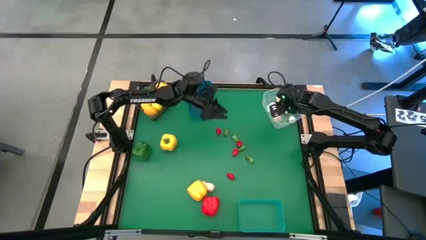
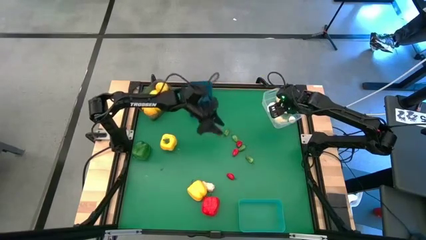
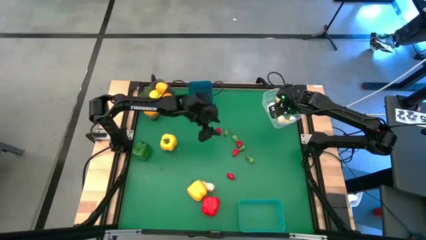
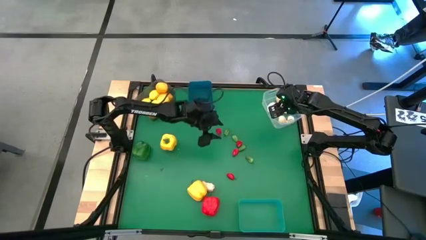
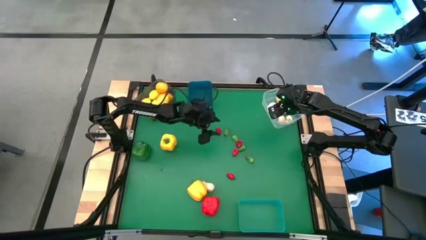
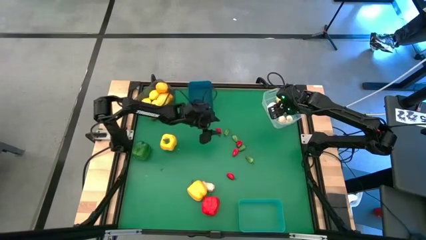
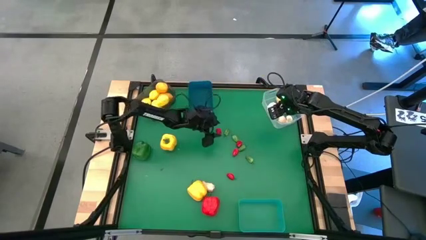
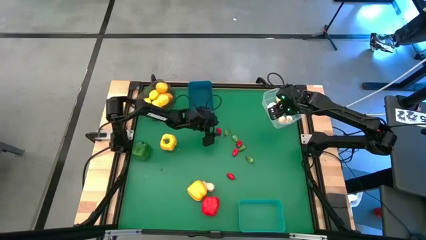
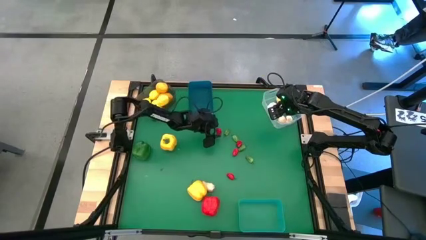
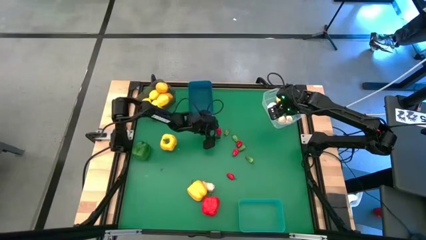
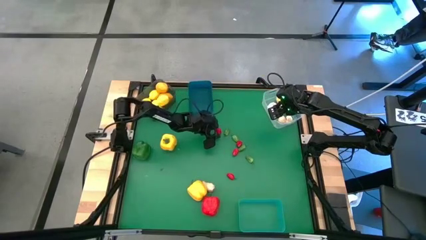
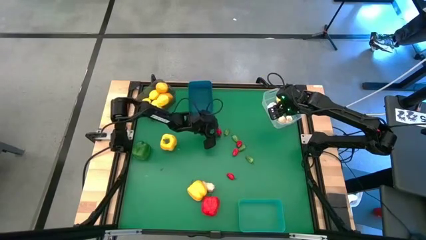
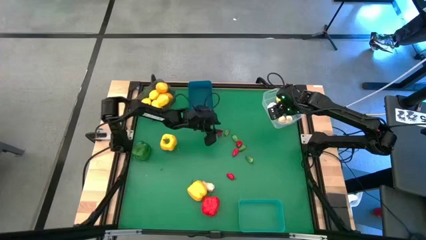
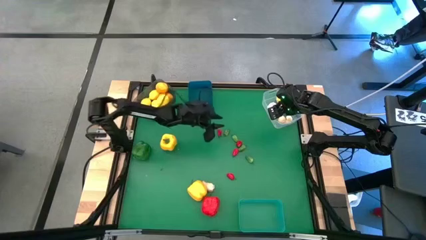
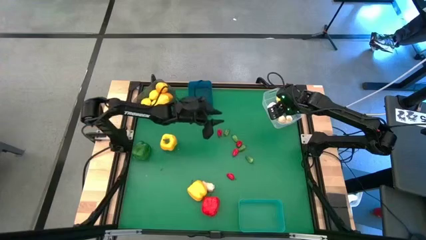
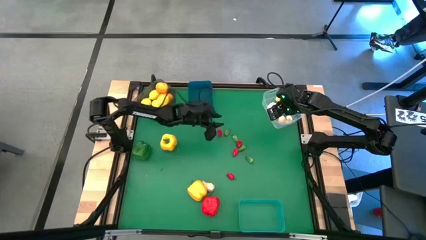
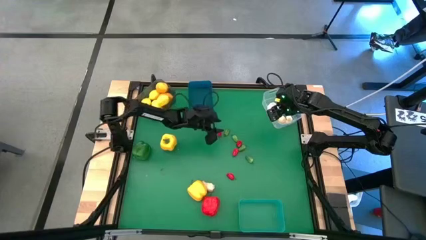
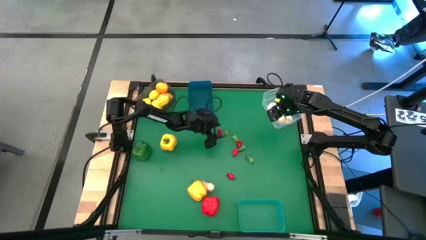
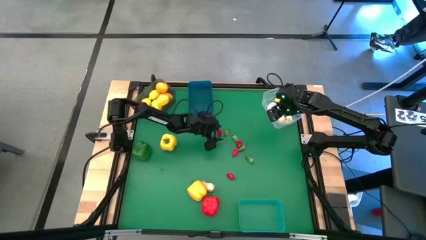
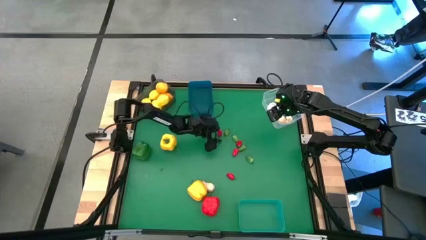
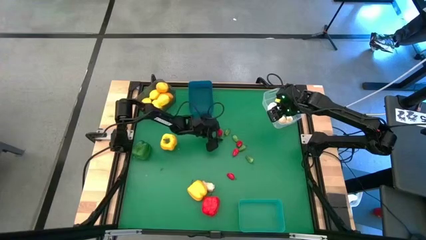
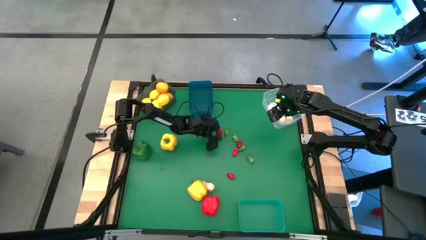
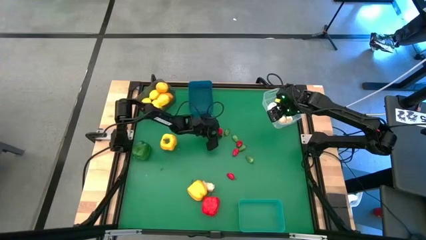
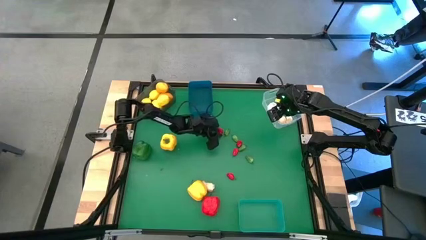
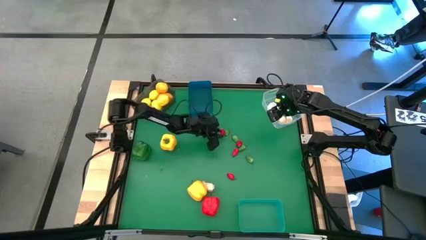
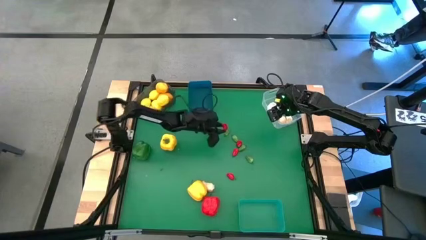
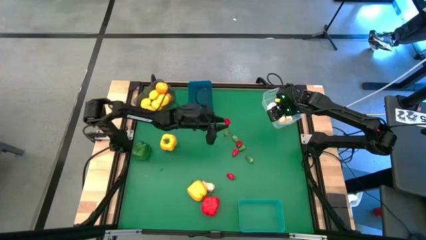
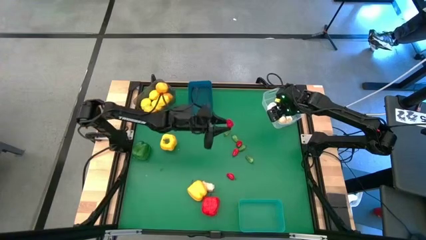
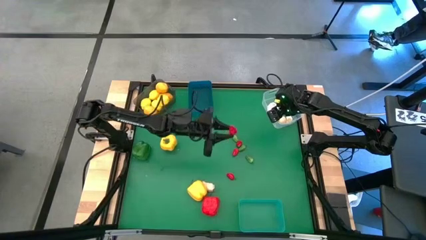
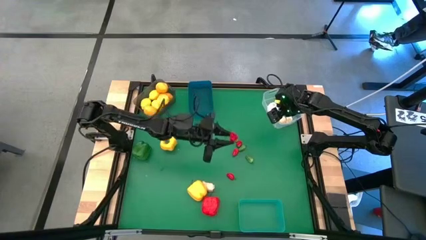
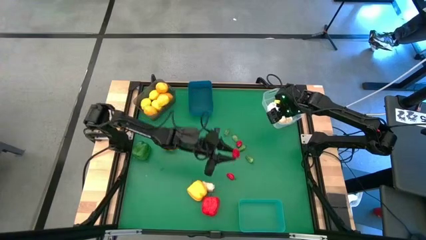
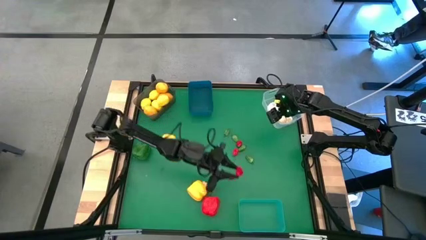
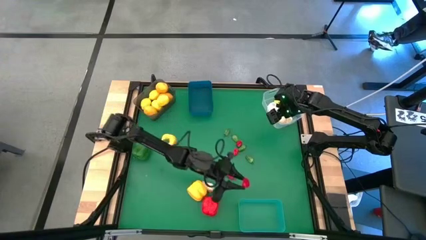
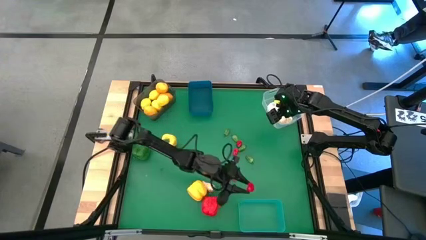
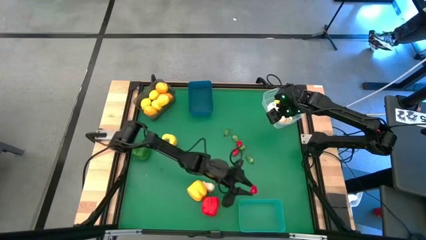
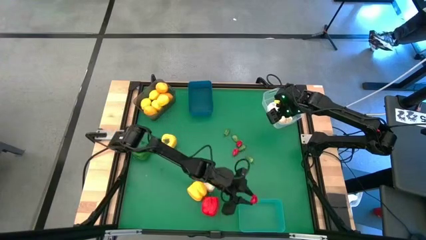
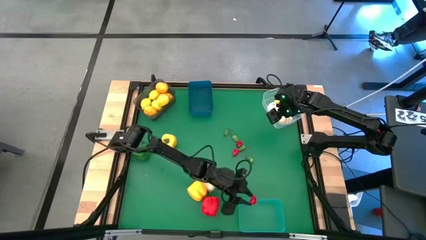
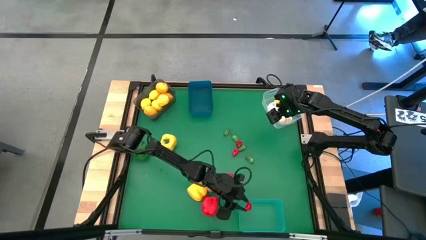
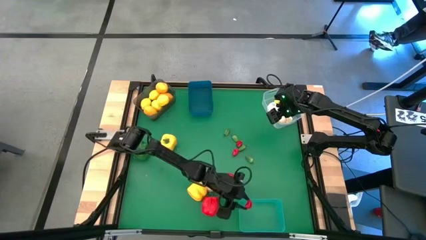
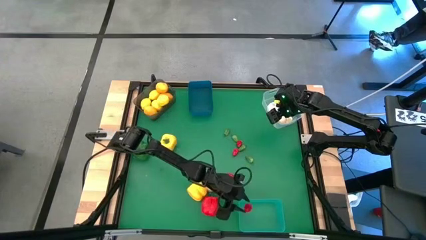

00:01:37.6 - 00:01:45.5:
Task: Sort produce into baskets
Put the top left red pepper into light blue bin

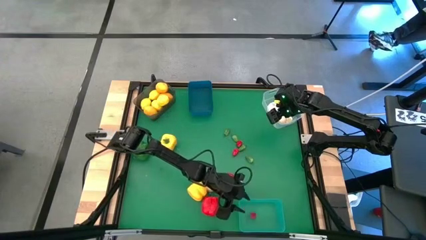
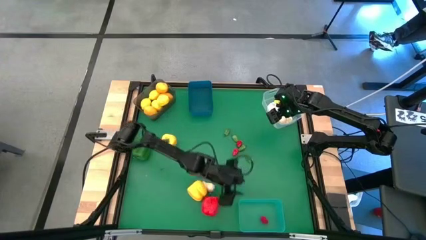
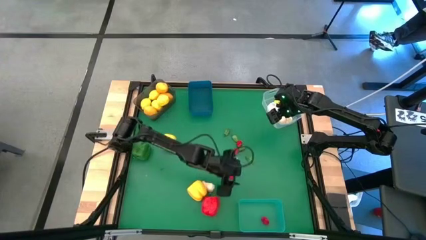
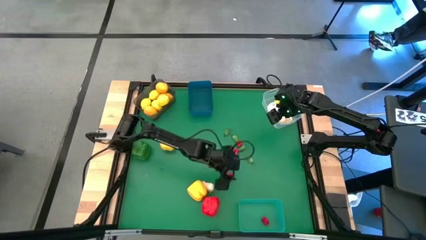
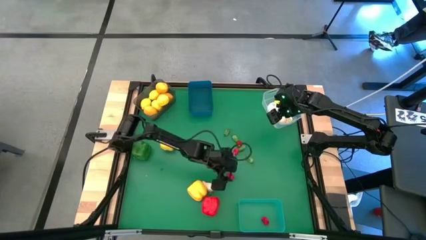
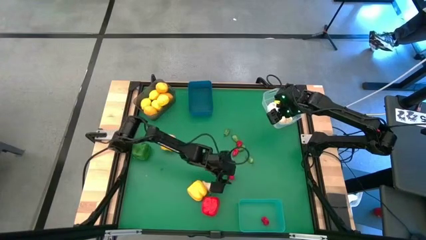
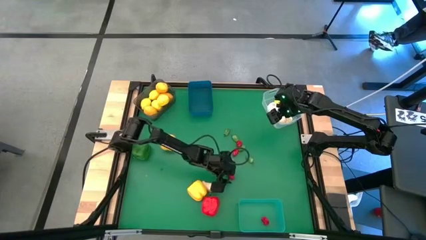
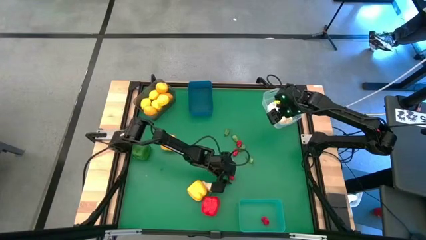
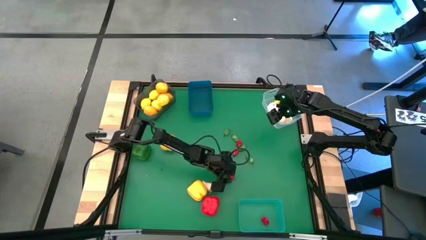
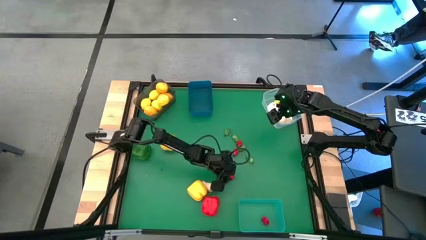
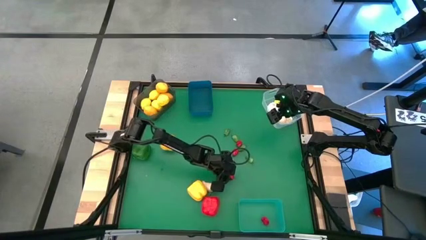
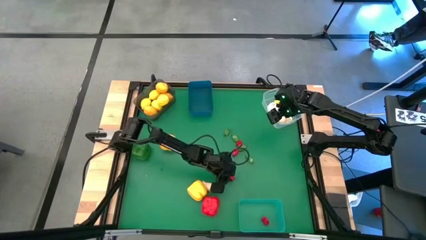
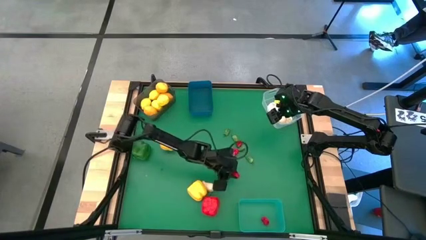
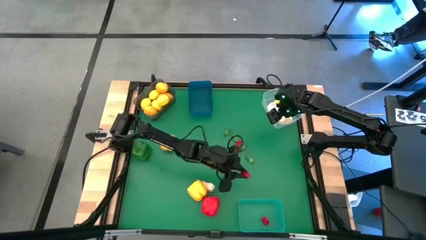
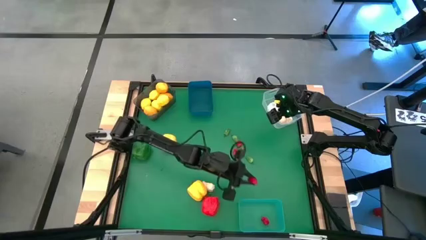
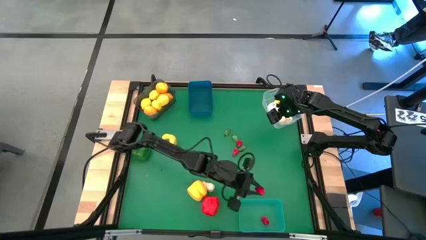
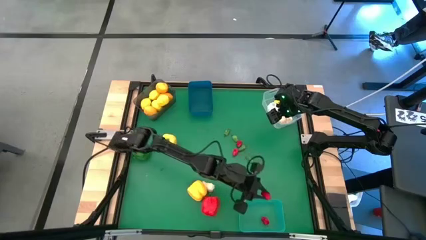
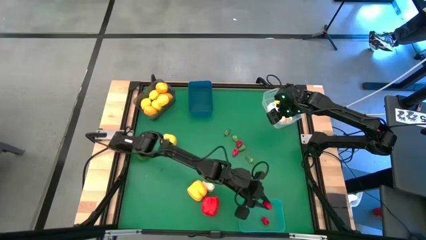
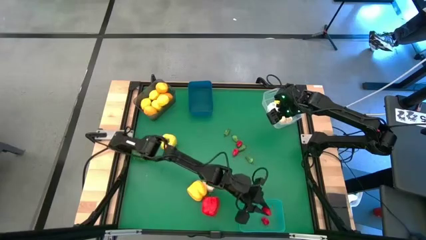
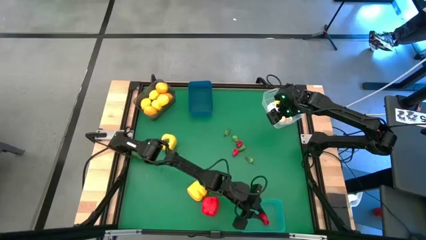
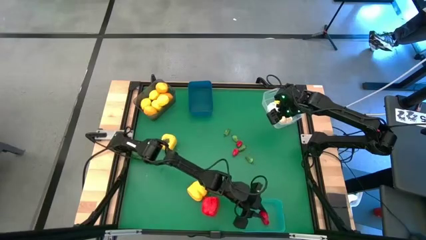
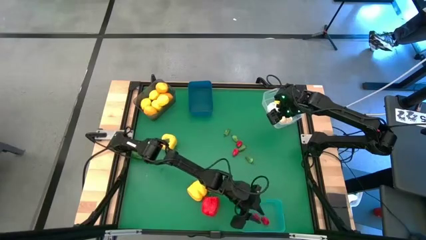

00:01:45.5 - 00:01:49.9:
Put the bottom red pepper into light blue bin

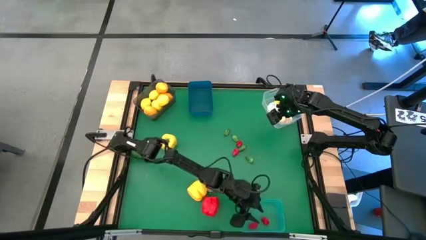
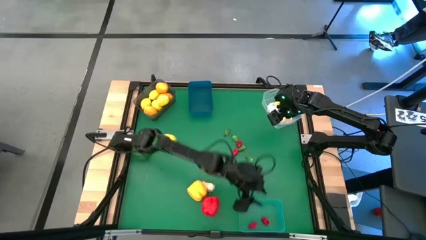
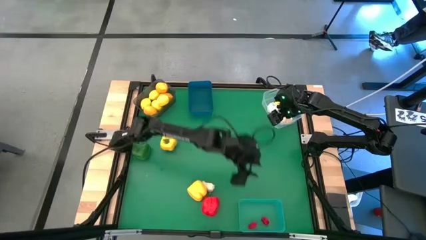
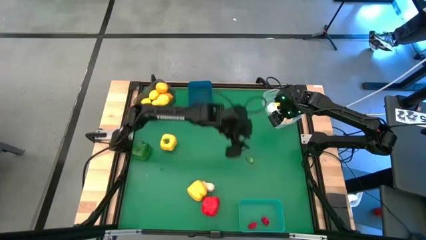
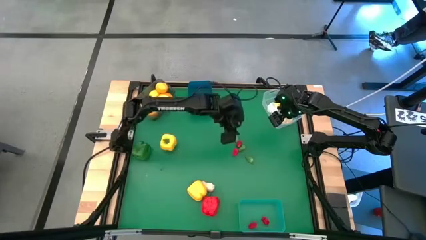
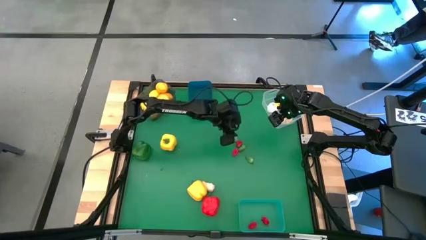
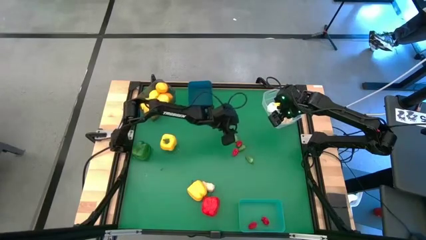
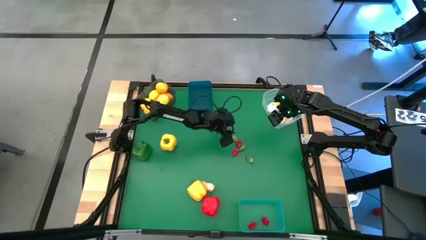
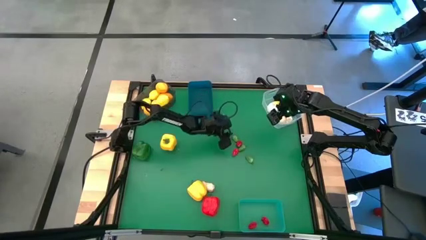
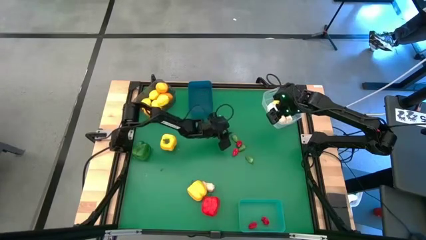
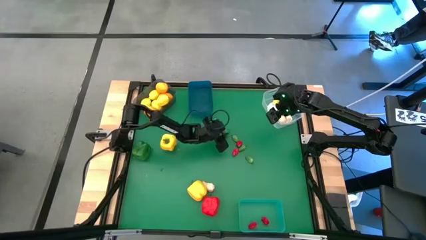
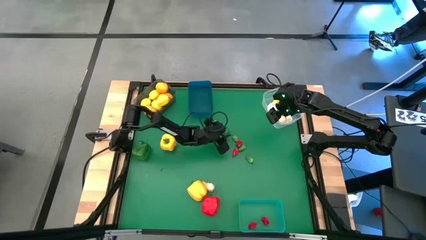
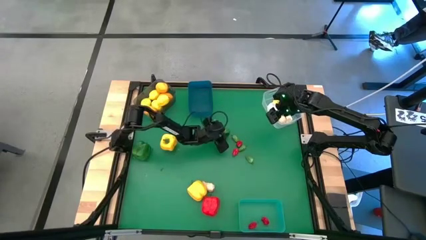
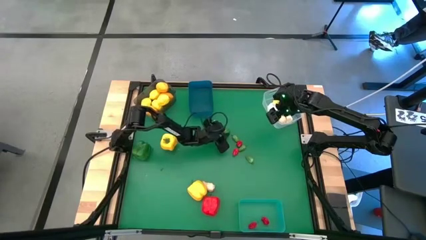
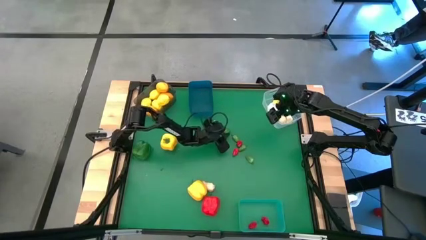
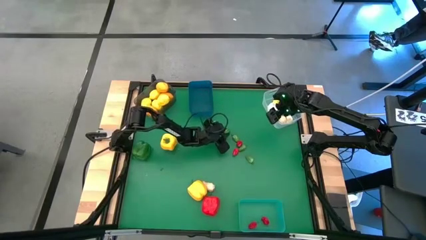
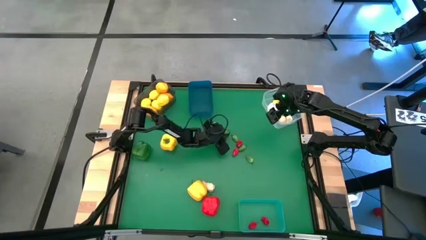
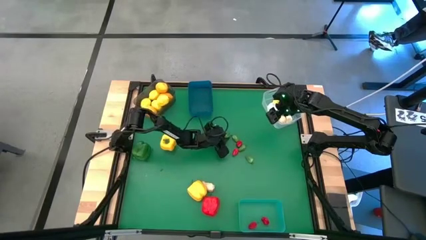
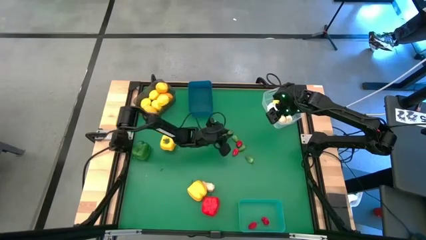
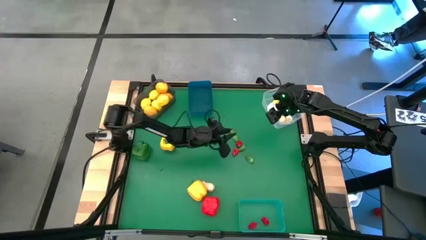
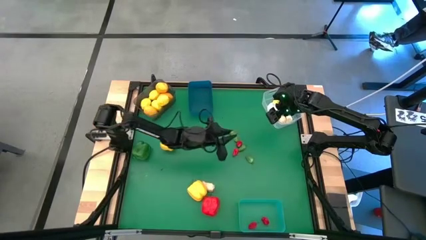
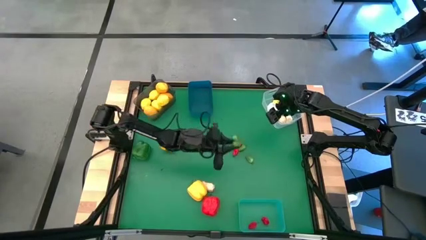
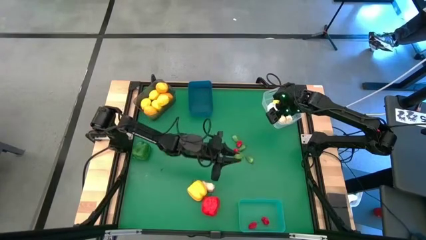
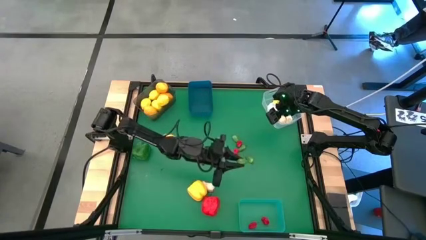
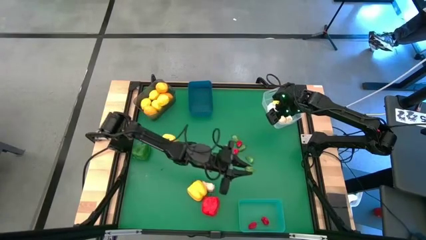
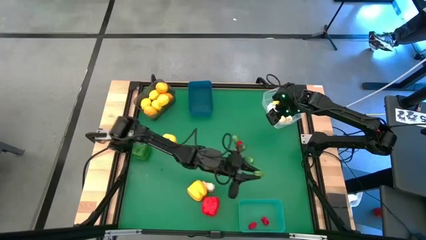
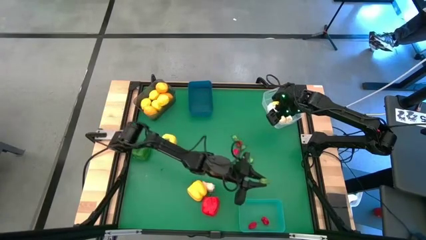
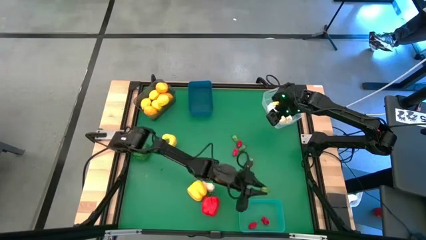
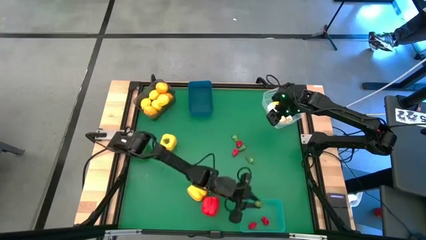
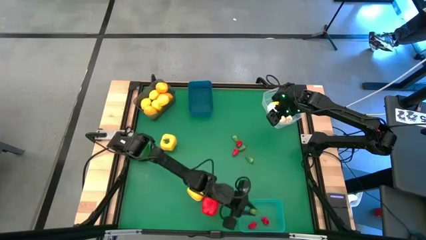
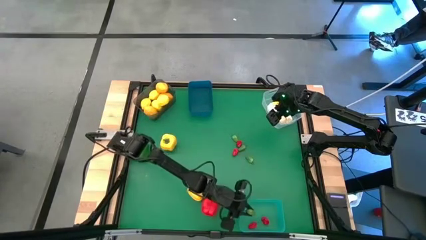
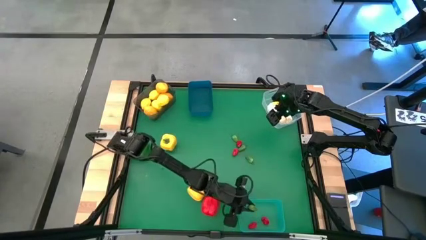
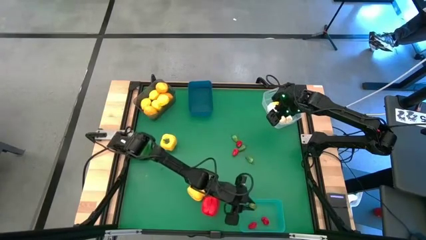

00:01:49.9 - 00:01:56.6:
Put the top left green pepper into light blue bin
